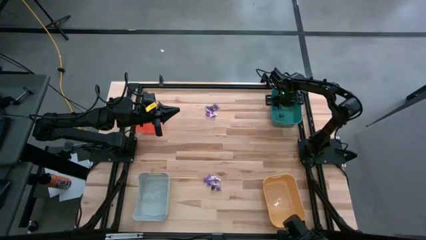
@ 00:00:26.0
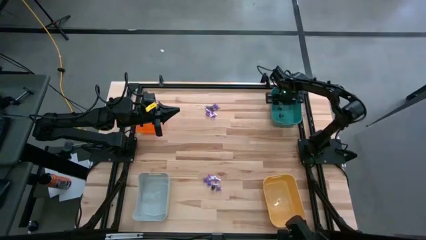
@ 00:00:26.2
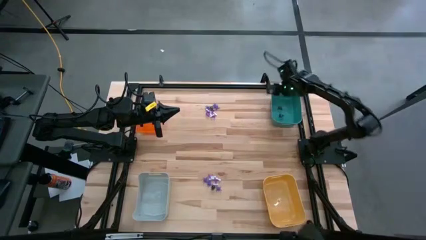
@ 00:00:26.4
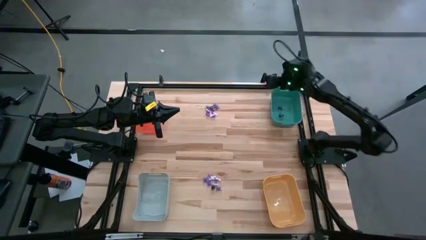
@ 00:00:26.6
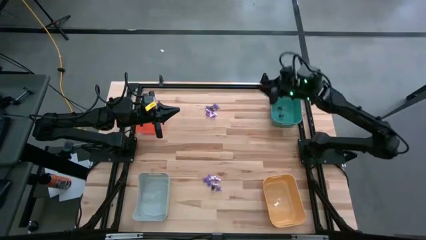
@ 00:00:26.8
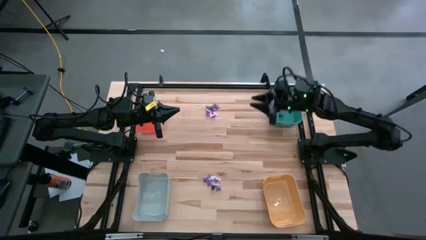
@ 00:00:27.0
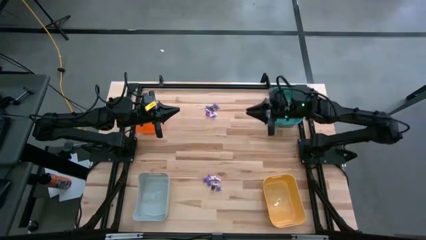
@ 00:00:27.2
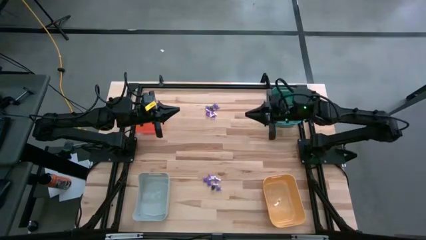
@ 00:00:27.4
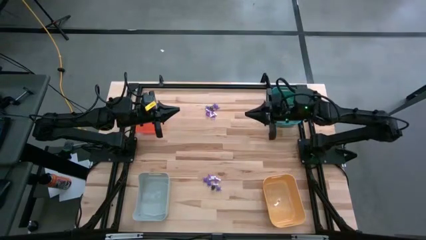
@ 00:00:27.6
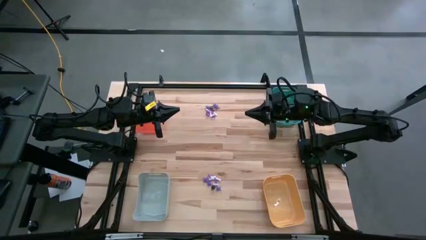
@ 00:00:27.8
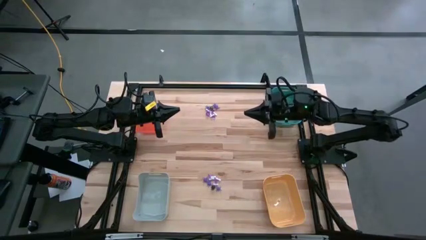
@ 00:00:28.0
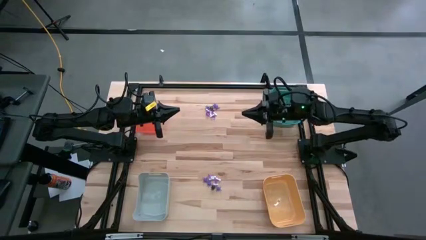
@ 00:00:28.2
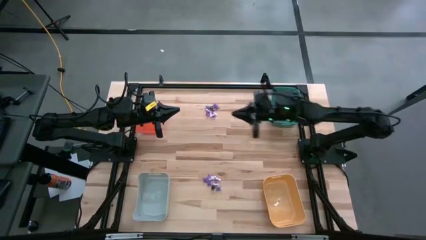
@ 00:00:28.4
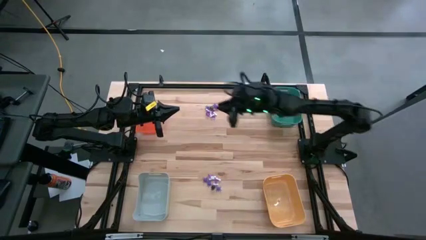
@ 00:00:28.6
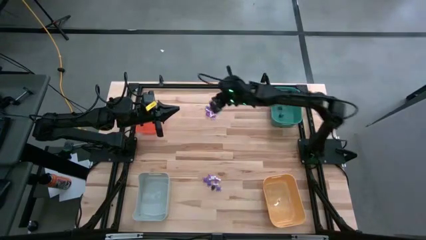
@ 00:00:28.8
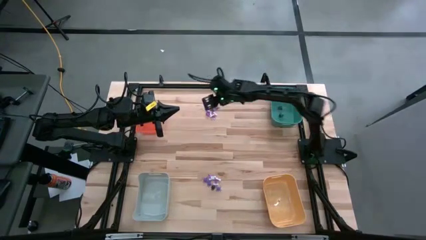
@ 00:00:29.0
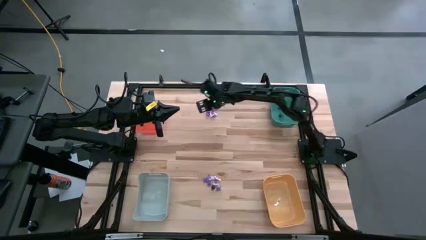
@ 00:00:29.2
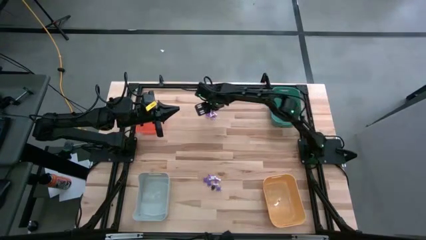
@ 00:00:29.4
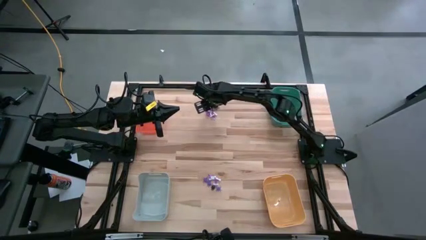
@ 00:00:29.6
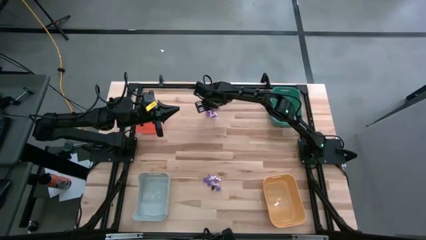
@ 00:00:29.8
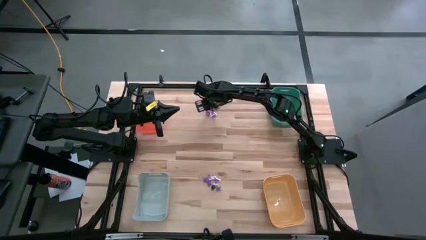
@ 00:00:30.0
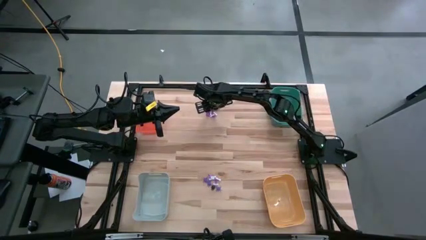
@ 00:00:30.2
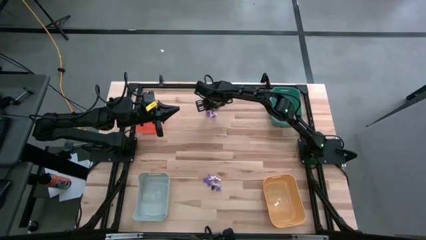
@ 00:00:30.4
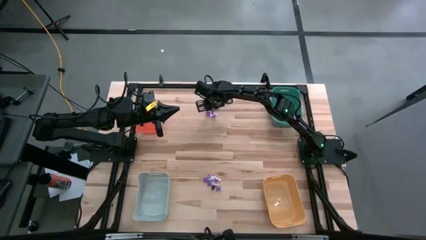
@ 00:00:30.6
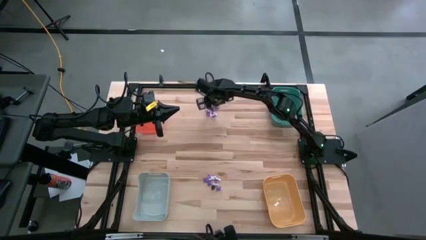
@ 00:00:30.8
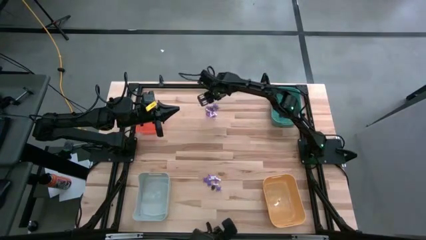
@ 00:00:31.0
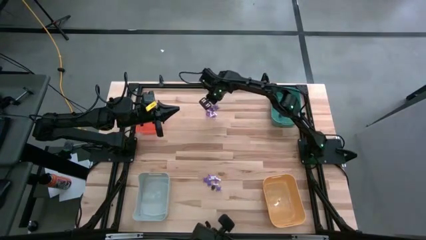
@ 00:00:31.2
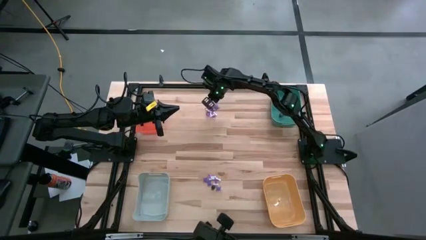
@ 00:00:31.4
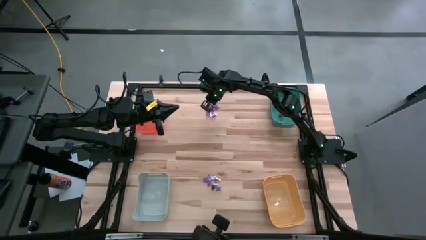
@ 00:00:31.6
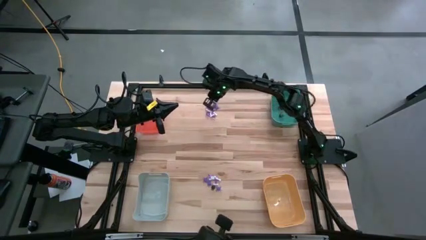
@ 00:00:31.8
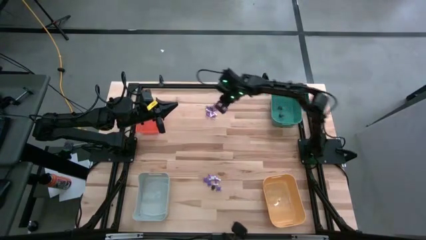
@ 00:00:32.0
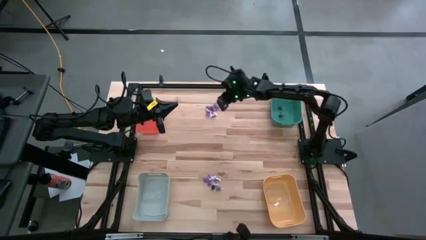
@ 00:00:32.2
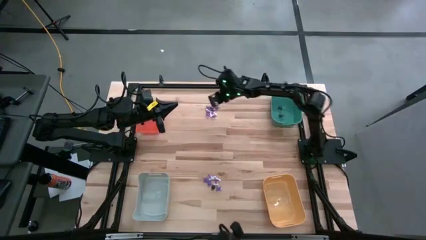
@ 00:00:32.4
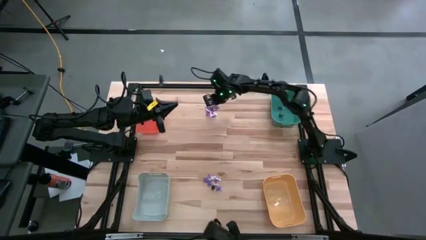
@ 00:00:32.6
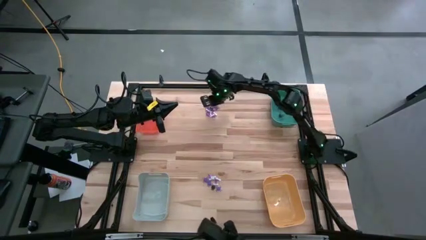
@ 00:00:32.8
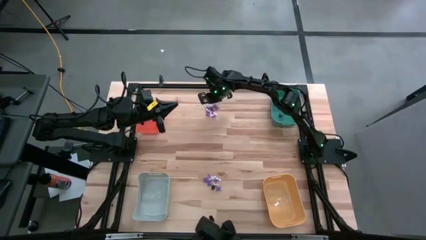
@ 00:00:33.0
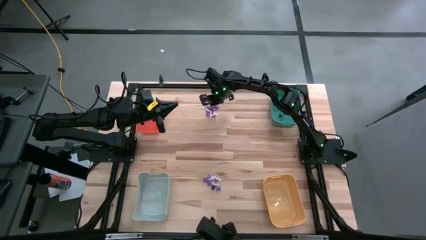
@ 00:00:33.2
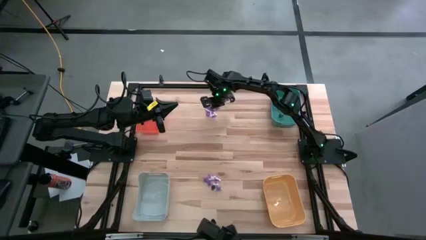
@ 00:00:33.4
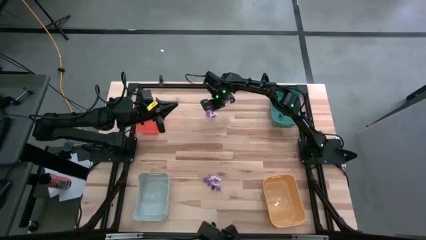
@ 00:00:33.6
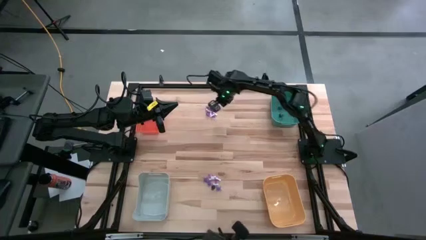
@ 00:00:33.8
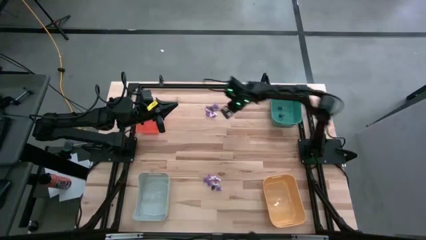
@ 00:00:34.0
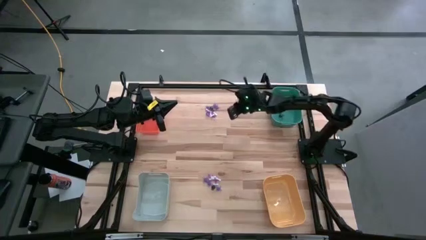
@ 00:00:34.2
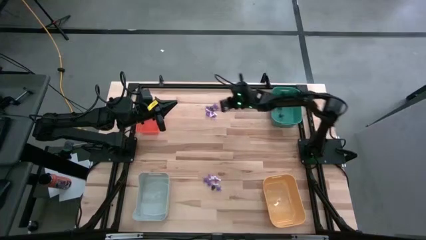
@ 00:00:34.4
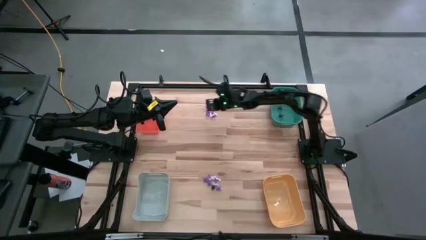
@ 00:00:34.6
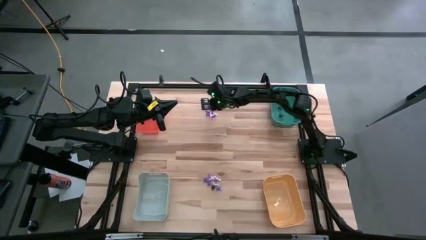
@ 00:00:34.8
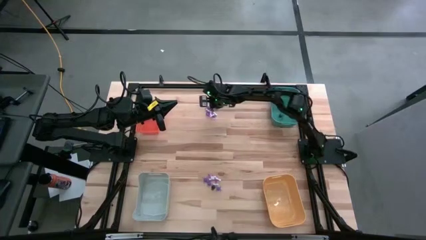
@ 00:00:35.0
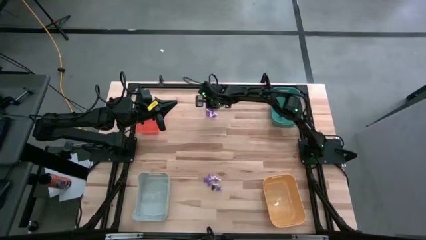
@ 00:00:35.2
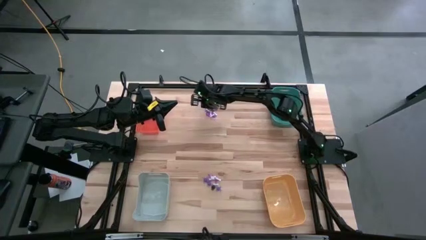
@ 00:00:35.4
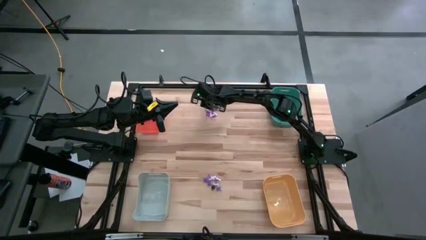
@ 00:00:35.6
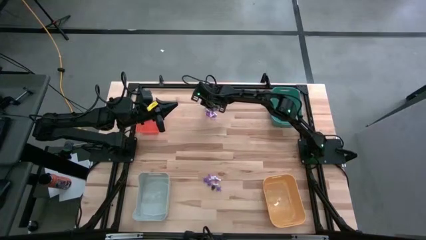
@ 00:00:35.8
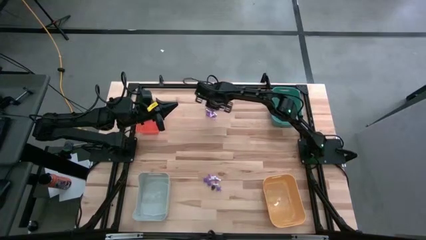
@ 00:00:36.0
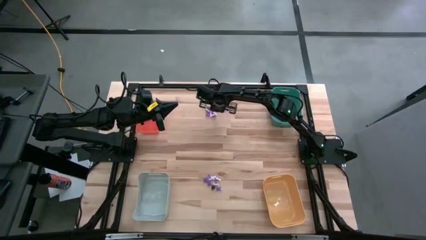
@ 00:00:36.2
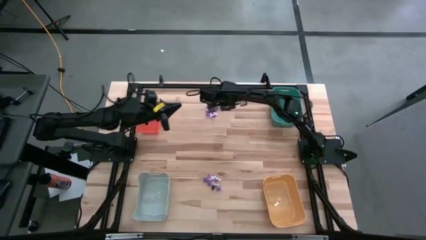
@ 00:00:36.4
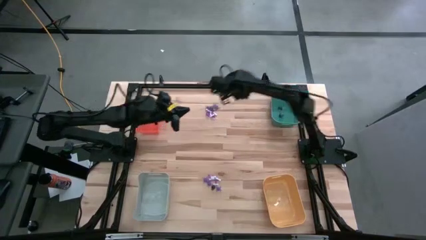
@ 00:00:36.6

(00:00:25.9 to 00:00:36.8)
Task: Sort Halloween decoration
Put the black skull toy into the green bin
